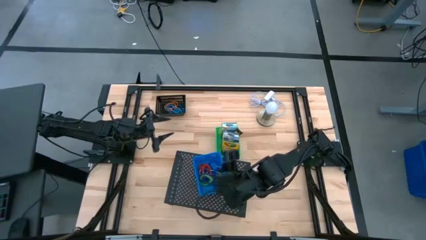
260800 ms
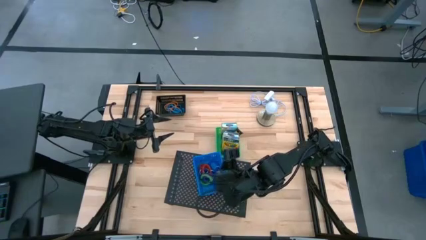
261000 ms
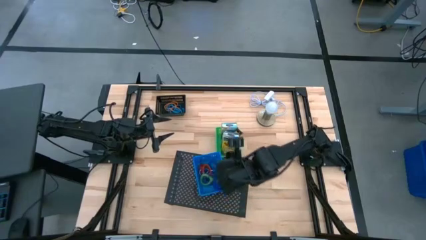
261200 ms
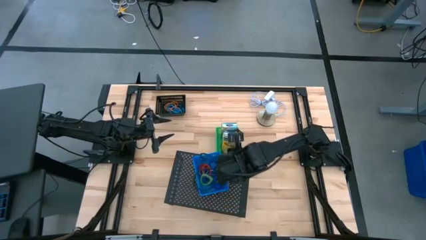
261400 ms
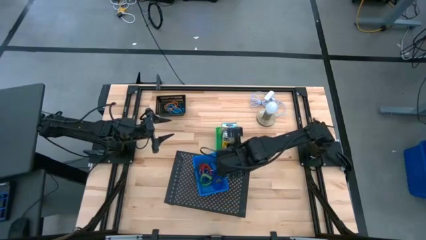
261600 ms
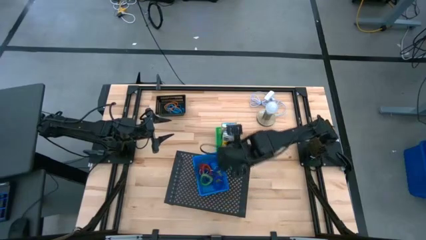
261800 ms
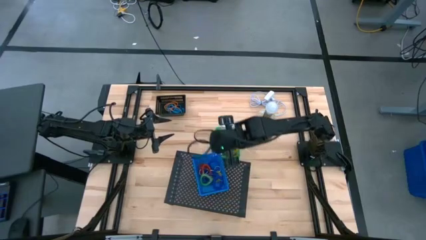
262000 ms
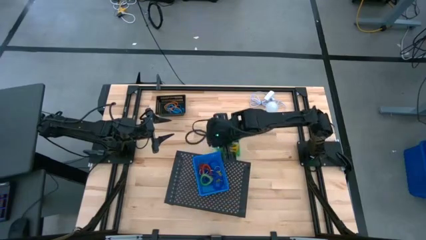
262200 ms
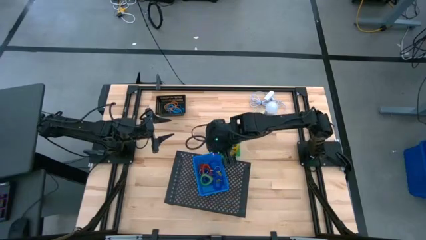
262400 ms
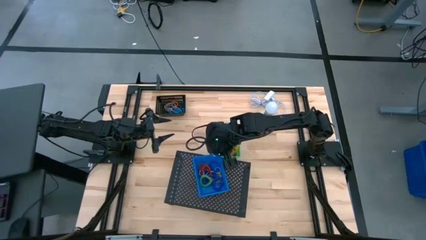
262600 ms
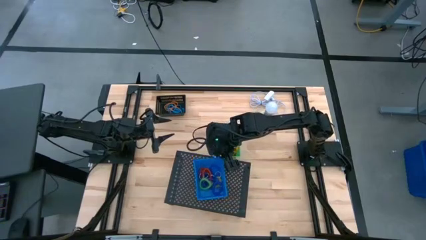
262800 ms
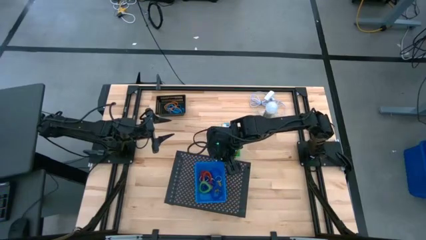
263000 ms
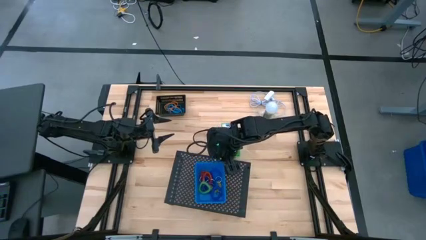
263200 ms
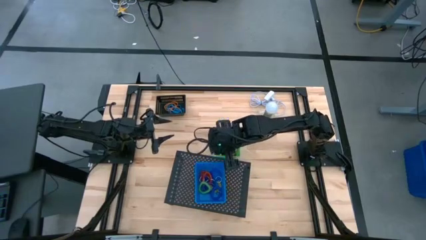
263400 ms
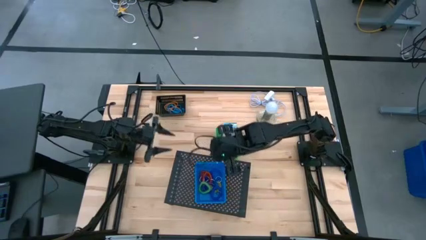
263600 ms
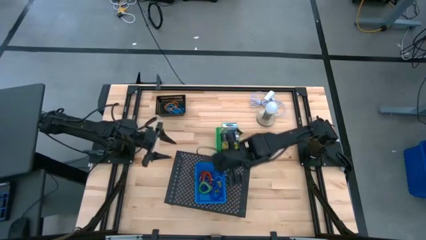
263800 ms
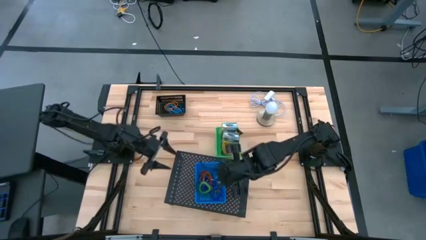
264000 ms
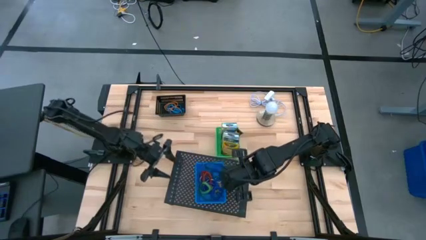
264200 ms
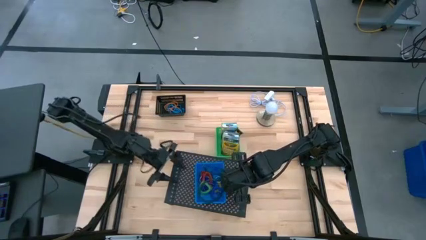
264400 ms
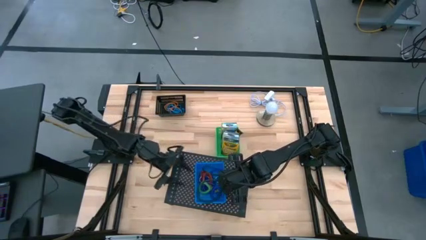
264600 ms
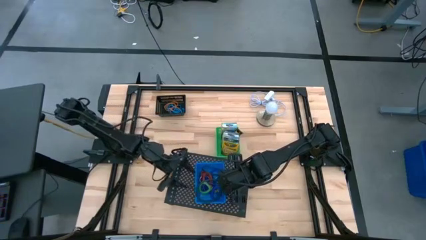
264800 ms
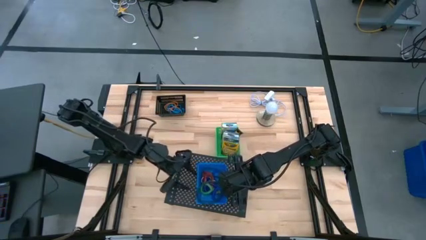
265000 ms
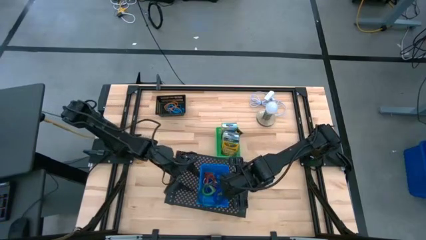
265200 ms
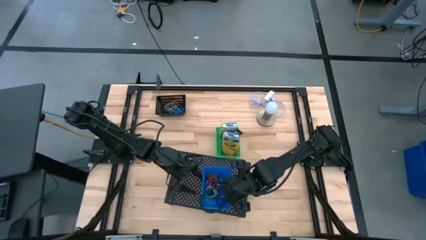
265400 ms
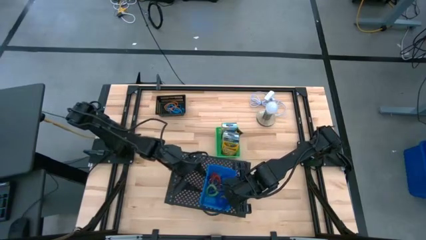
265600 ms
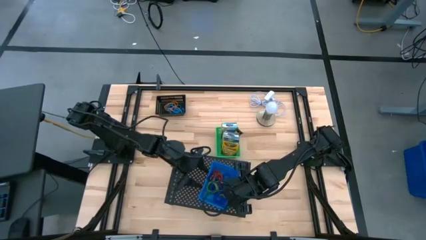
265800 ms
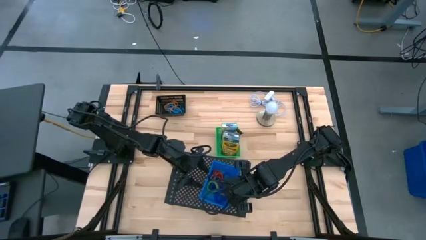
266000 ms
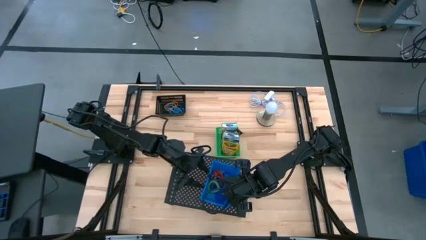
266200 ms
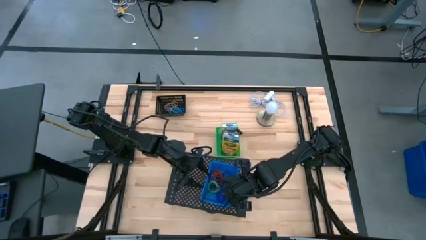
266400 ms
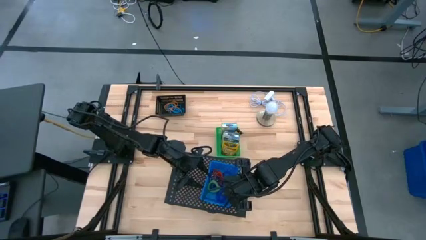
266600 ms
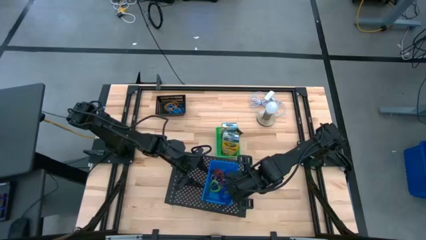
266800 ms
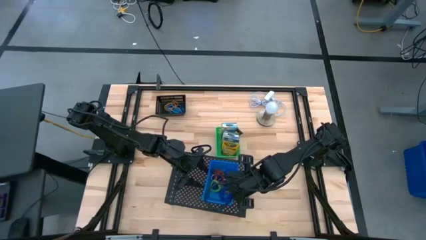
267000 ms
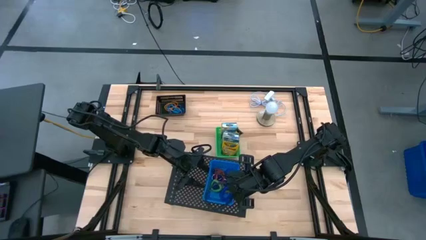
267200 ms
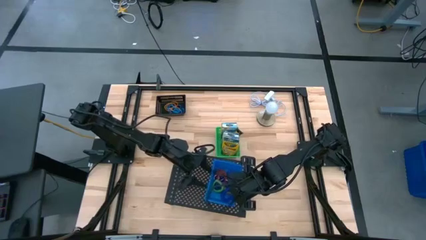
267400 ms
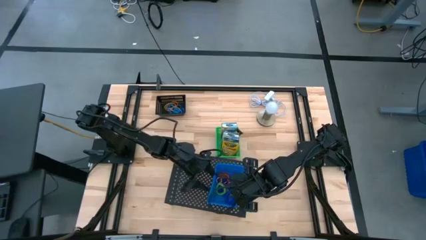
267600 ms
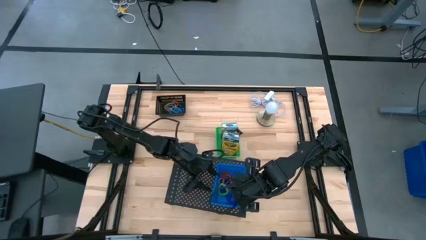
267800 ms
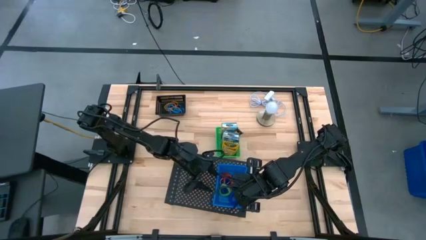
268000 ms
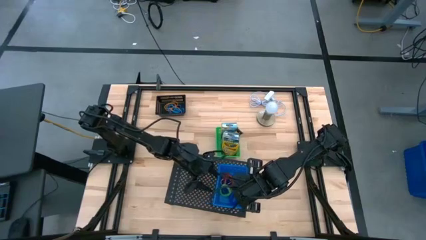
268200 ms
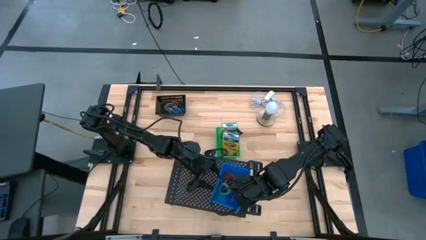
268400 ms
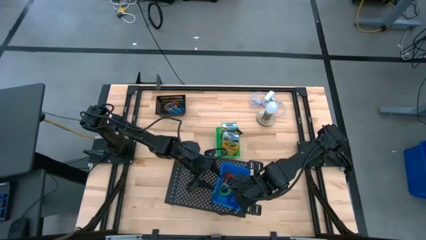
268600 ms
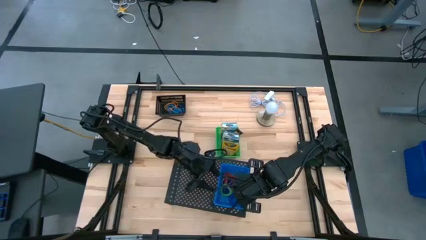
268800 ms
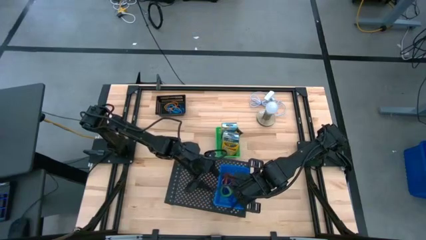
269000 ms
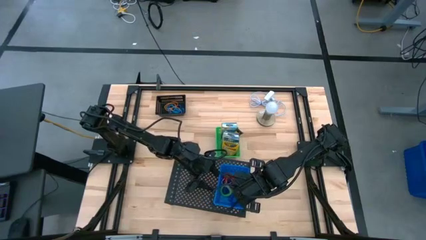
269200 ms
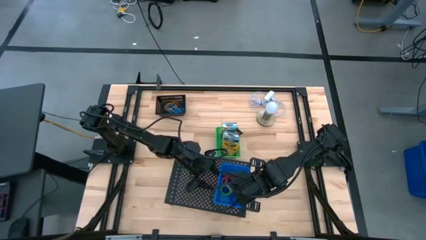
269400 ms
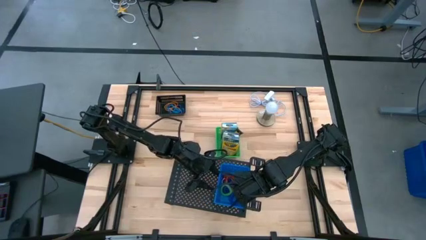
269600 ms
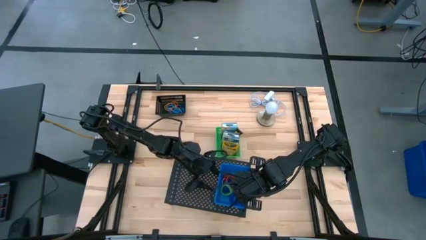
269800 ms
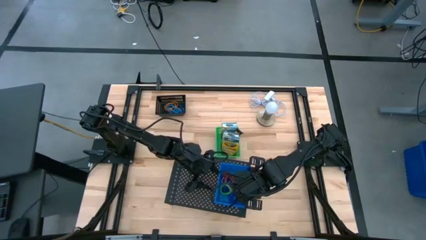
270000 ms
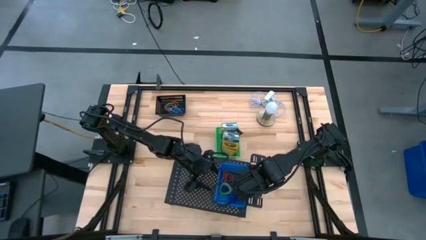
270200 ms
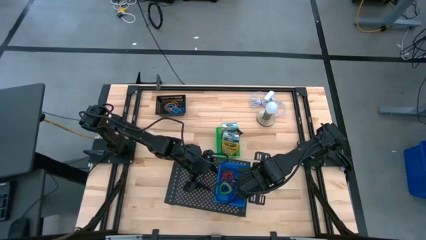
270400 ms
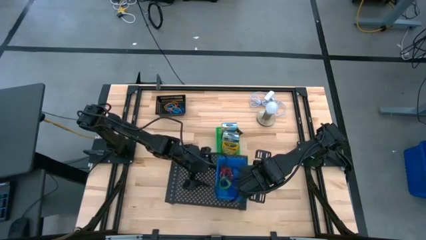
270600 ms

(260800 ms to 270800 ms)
Task: Pick & Place Office Desk Supplies
Put the blue bin with the spring keychains on the shelf

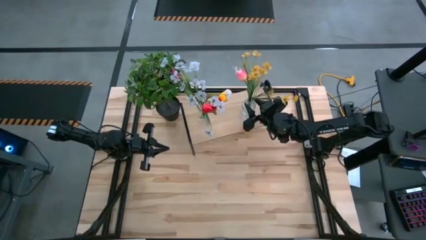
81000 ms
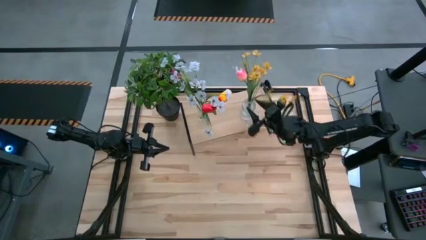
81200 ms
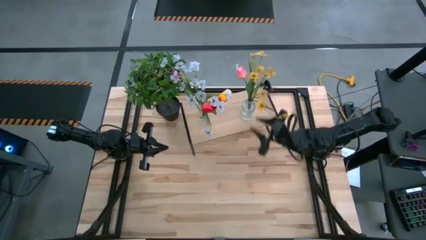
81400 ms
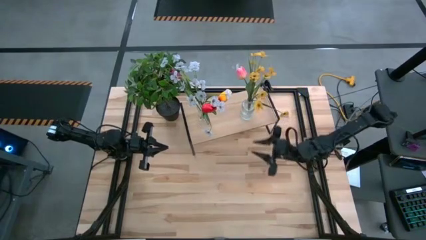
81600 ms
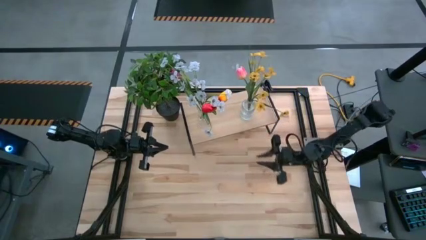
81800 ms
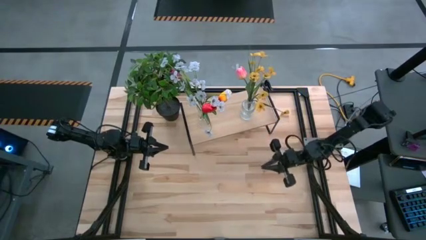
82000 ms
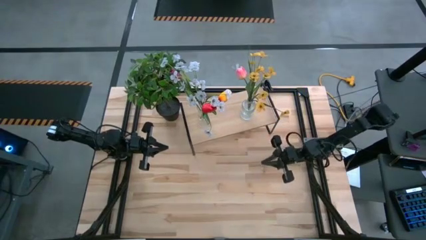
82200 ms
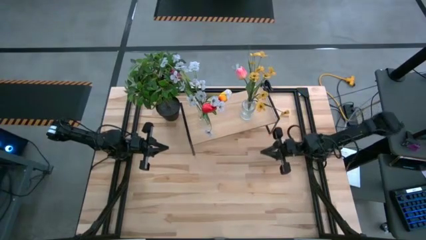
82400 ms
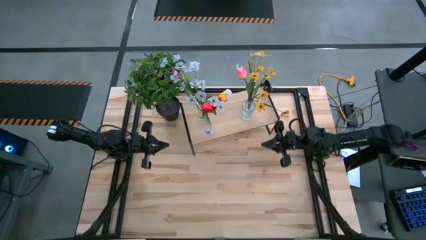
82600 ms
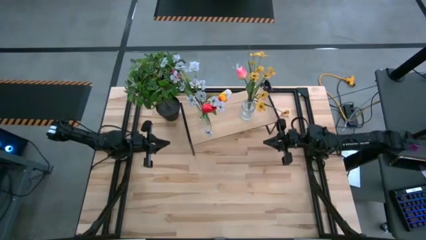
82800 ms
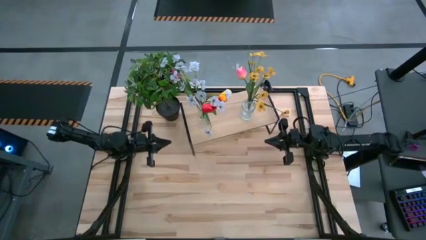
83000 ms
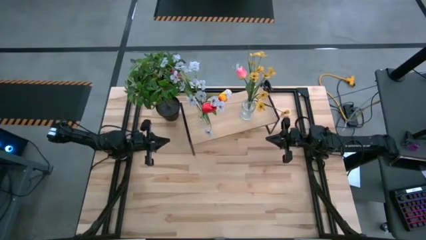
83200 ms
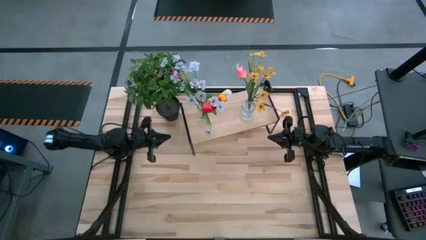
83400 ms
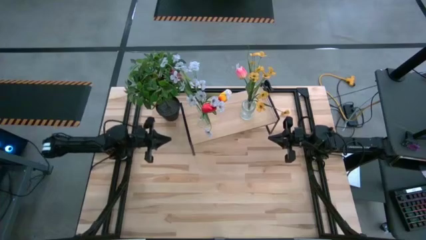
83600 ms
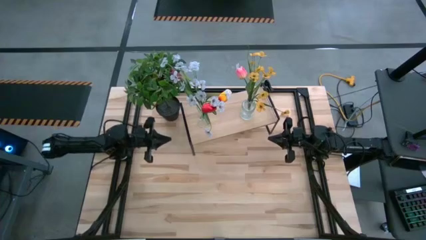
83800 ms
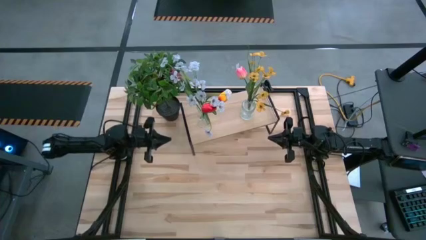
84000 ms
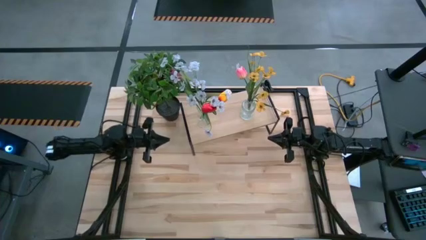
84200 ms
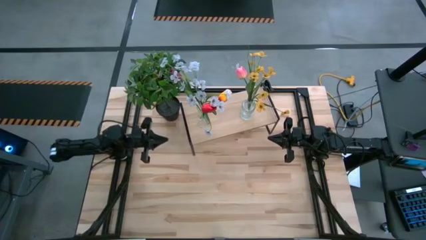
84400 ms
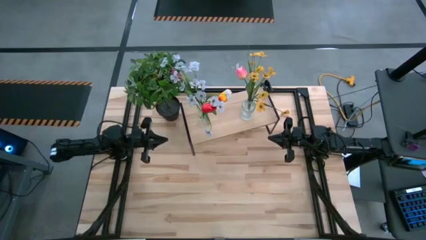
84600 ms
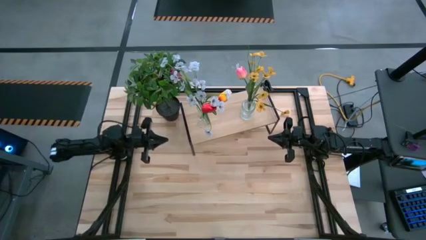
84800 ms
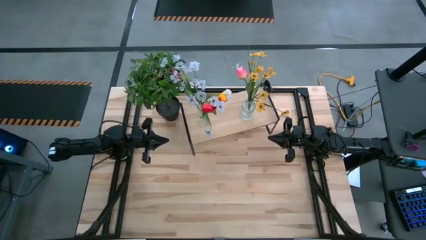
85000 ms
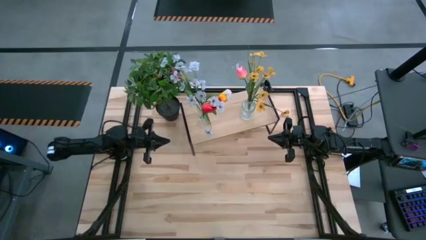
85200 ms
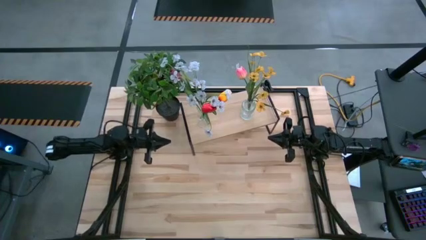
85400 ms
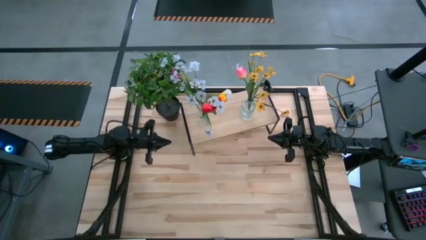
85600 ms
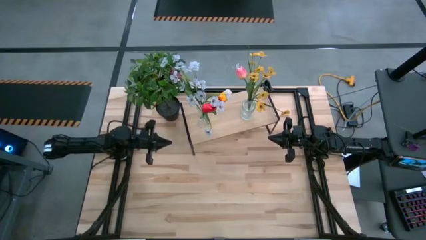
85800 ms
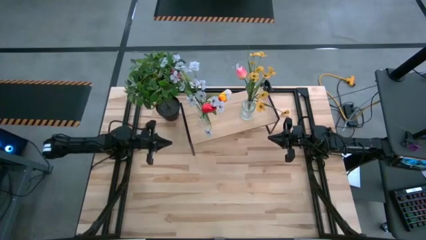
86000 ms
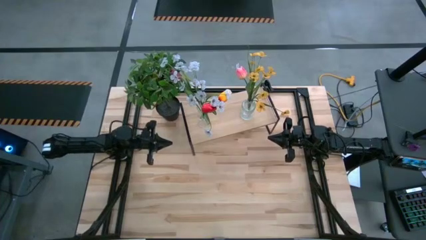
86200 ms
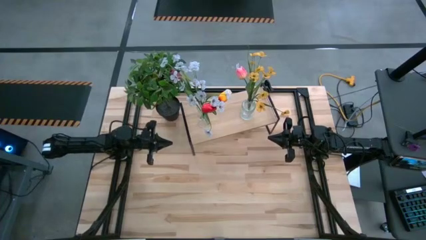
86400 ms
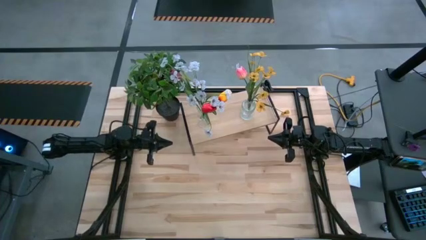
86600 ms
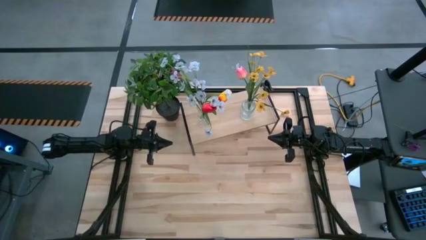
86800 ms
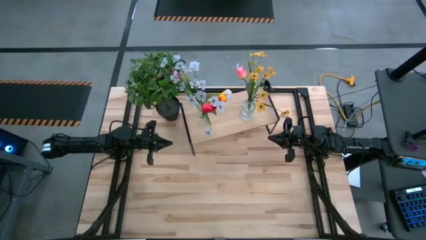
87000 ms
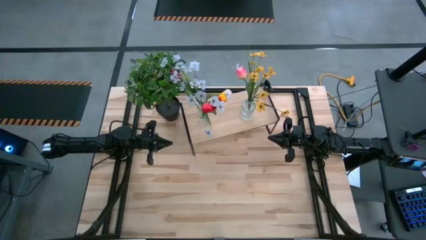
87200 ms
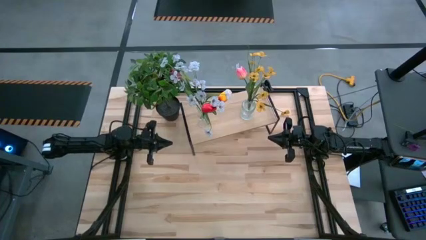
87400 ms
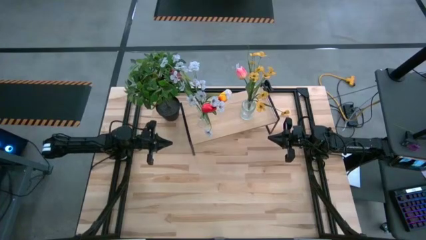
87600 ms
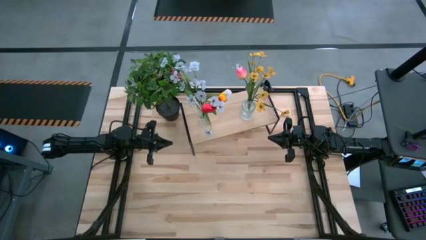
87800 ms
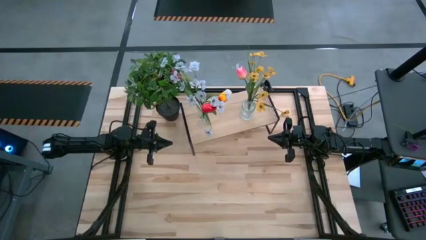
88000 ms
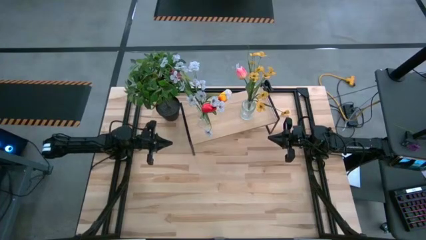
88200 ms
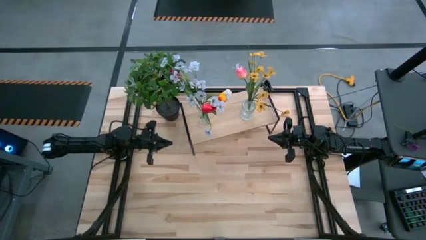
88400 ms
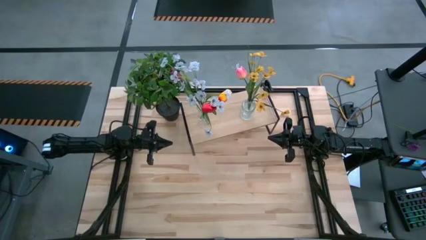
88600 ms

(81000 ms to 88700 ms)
Task: Pick and place flowers into a vace then onto a shelf
Return to Home Position
